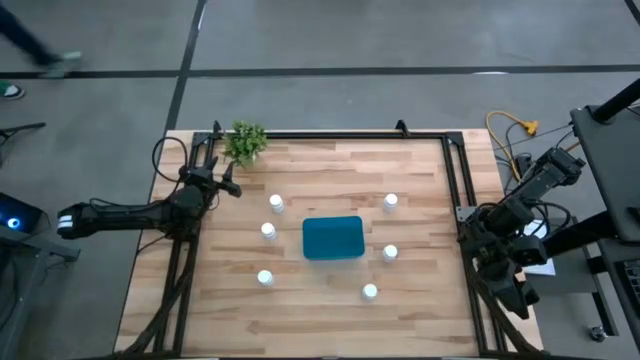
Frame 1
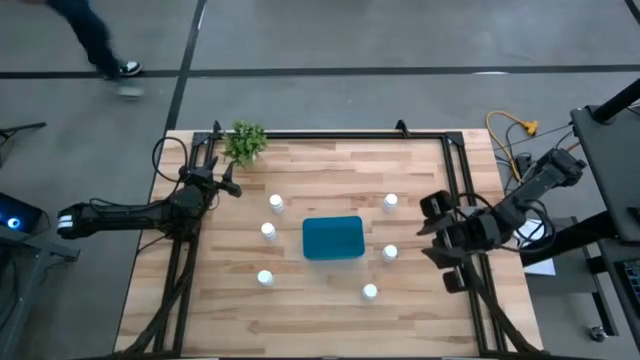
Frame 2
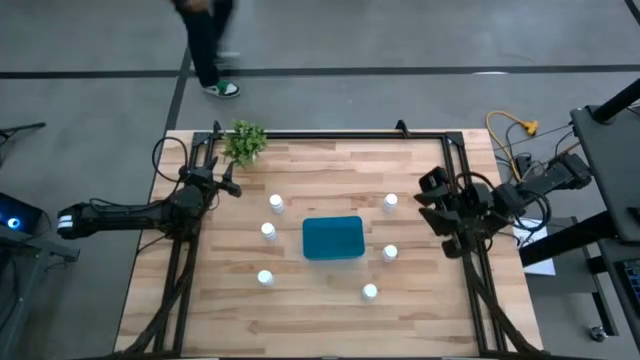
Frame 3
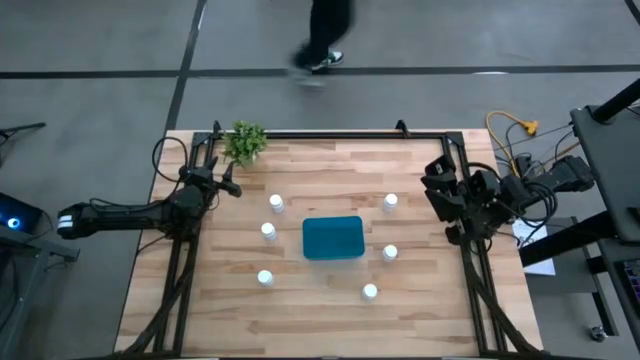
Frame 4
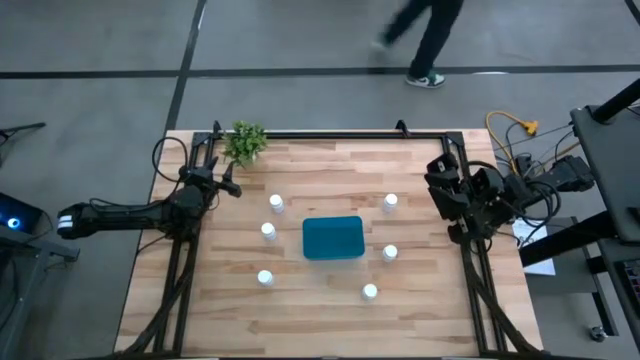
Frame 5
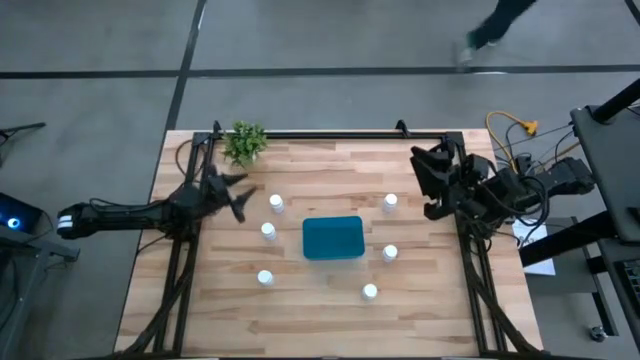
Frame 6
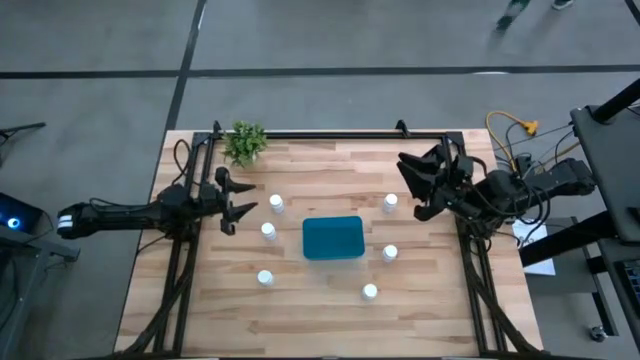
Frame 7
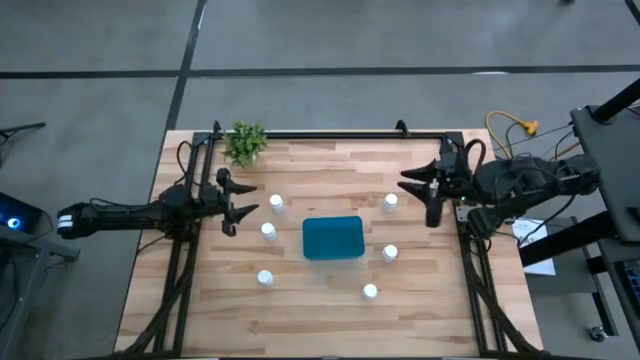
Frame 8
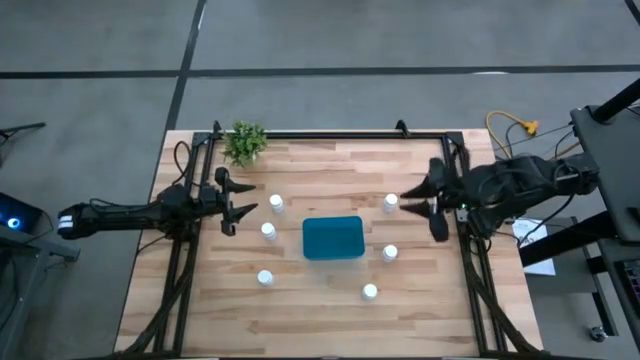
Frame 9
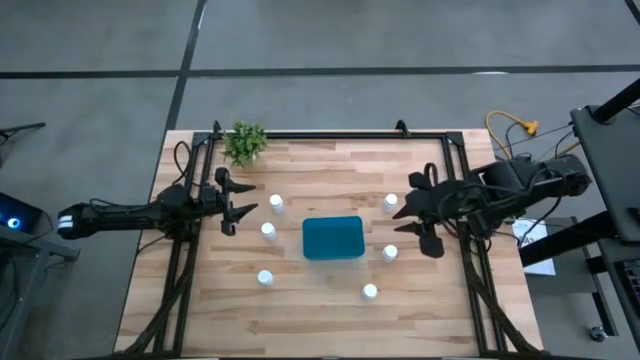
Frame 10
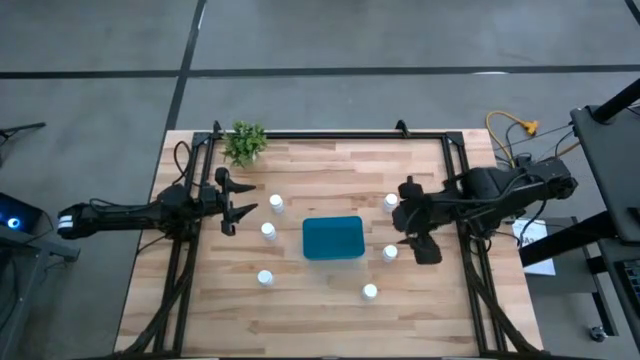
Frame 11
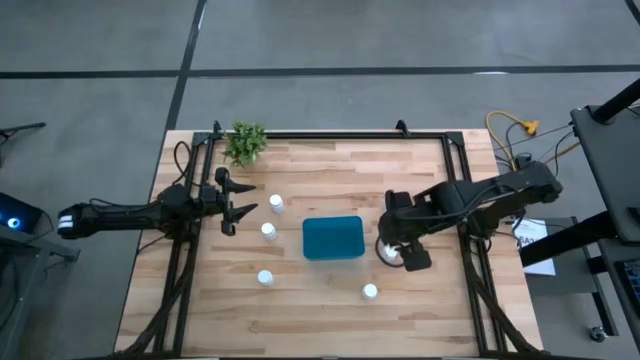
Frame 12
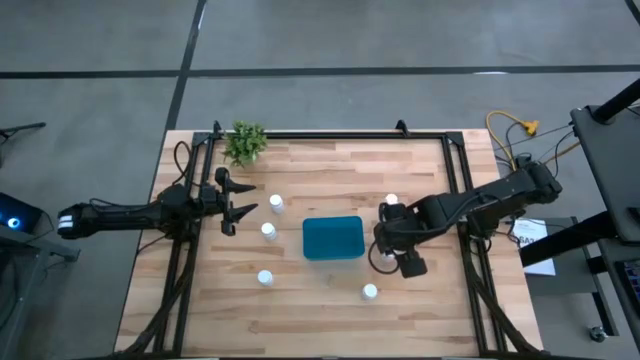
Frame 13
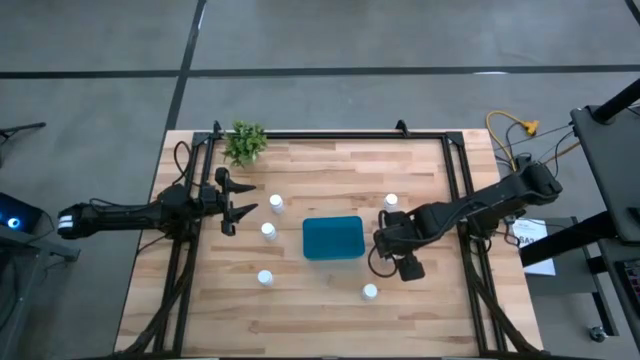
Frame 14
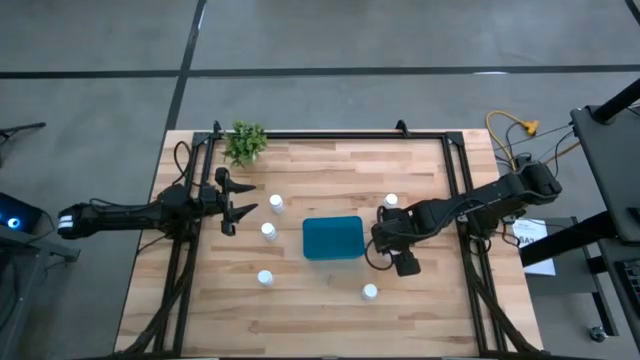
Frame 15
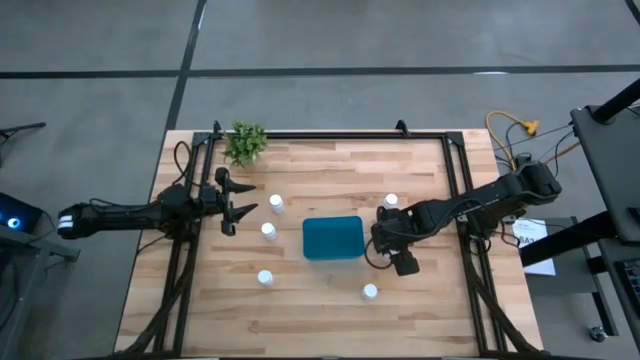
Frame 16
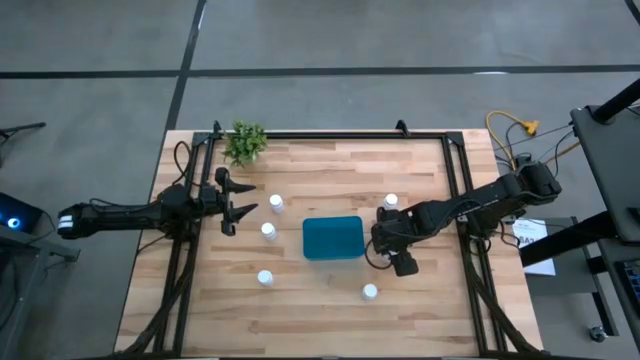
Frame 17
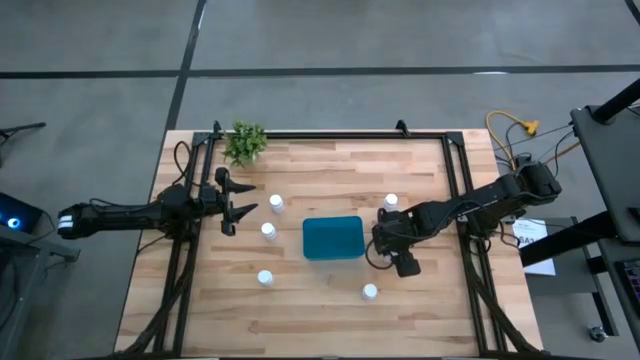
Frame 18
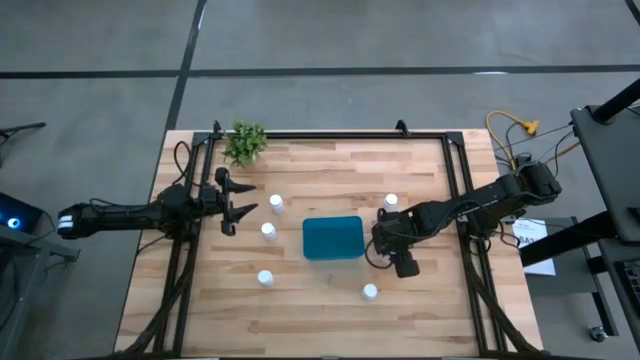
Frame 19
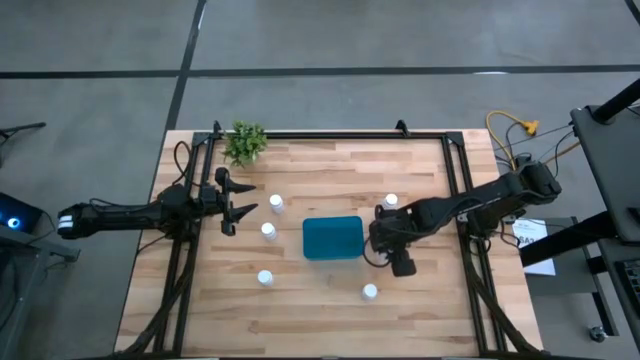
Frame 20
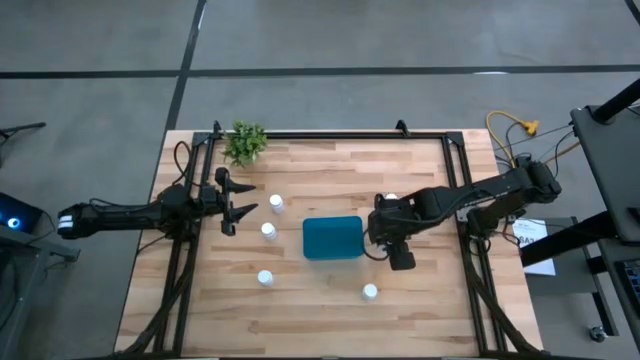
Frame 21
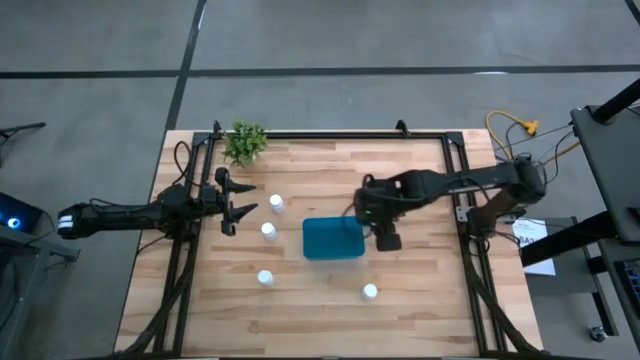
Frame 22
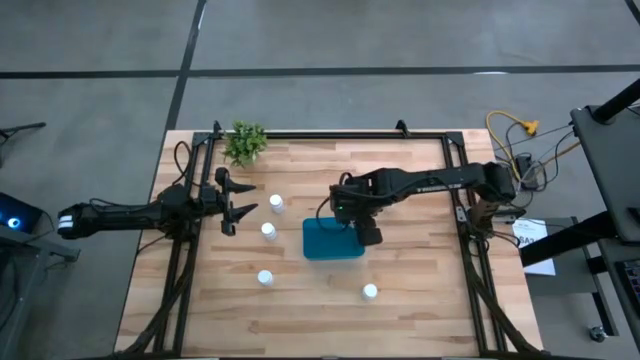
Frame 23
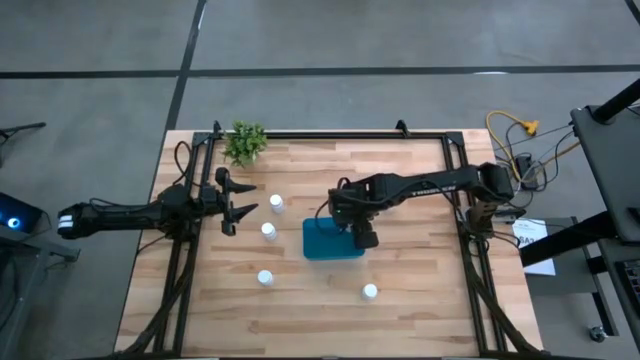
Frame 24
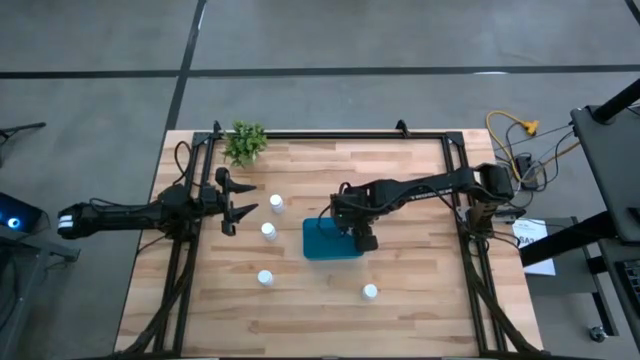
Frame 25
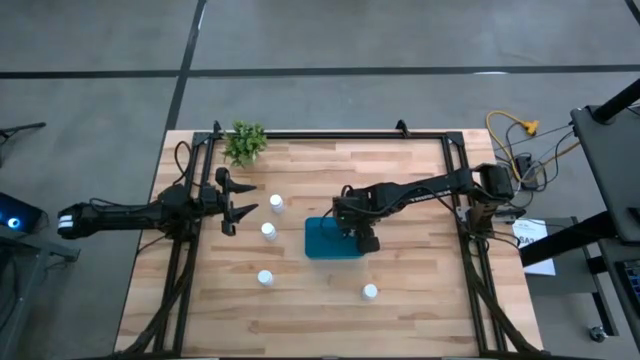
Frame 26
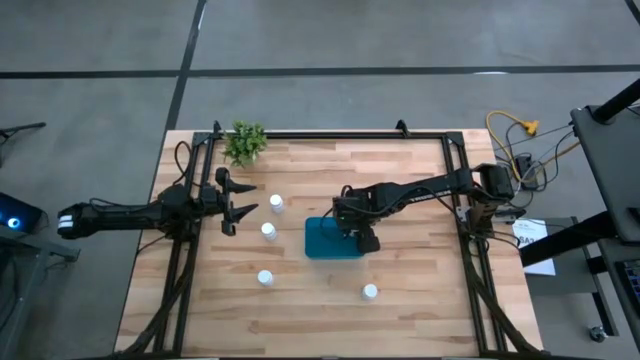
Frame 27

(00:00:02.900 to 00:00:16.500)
Task: Pick and place pill bottles into a basket
Put the white pill bottle into the blue bin

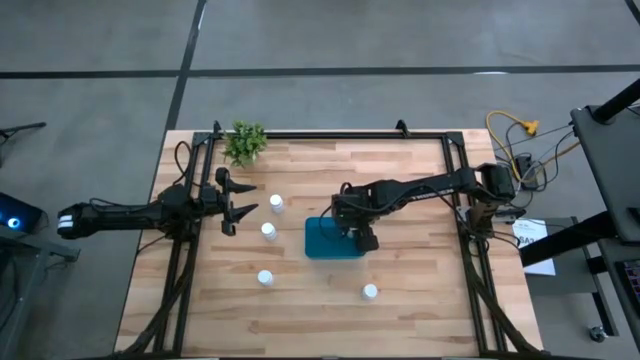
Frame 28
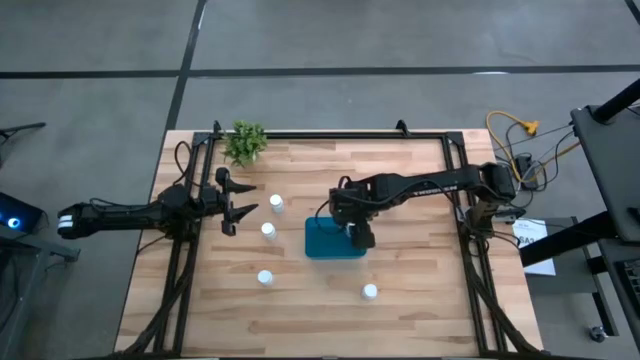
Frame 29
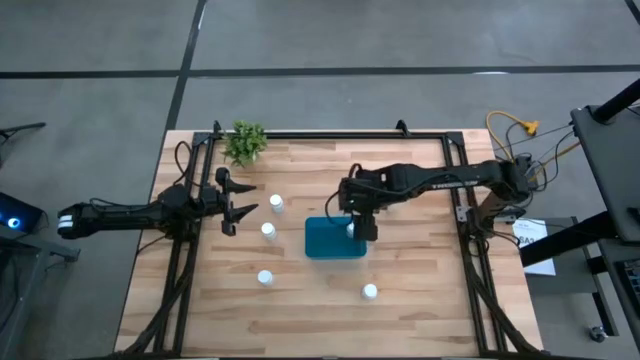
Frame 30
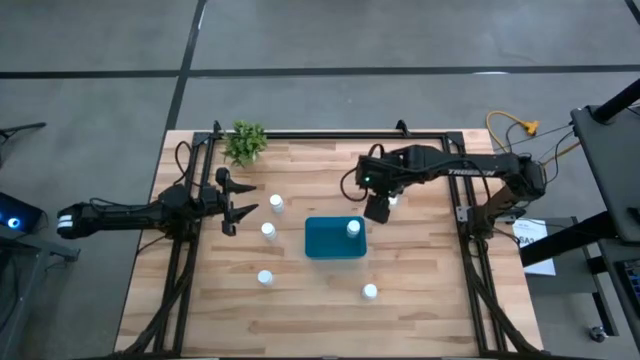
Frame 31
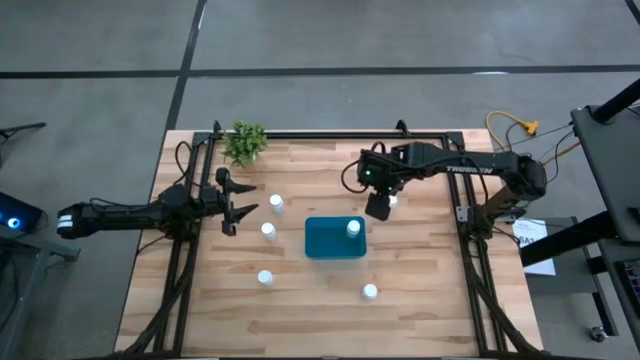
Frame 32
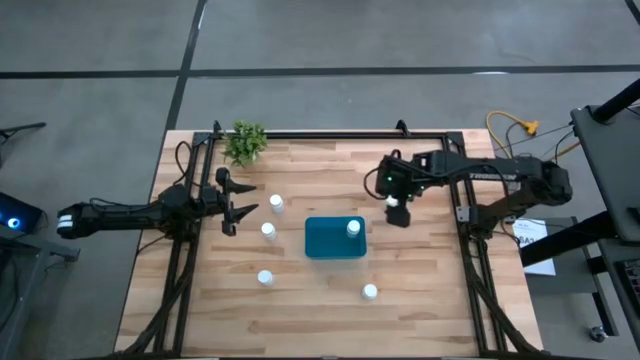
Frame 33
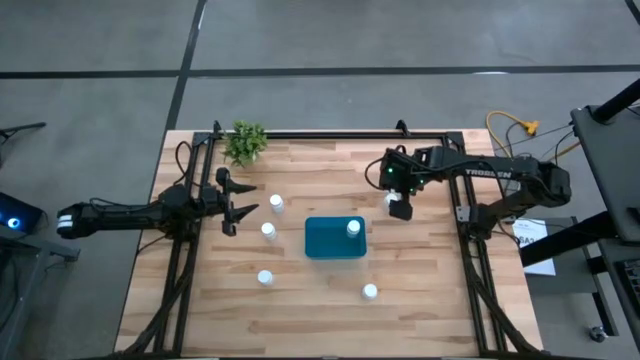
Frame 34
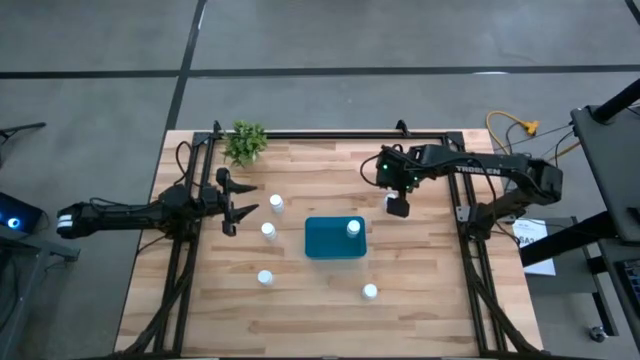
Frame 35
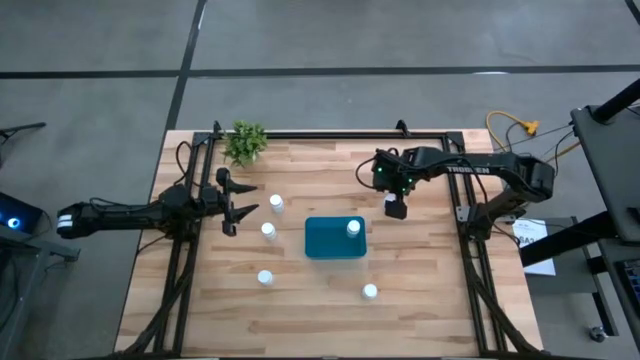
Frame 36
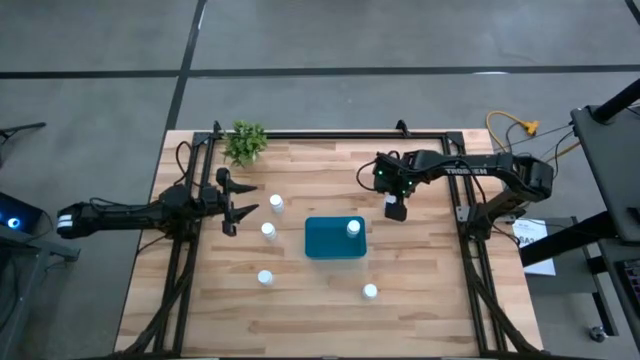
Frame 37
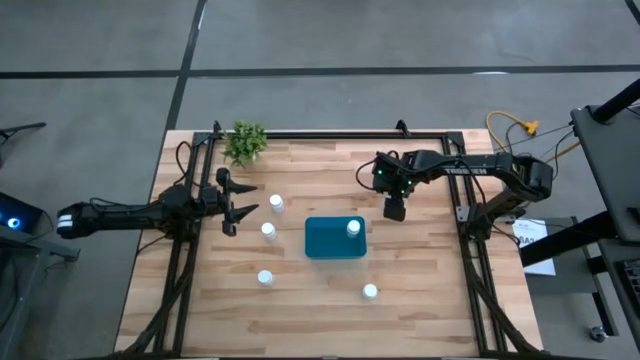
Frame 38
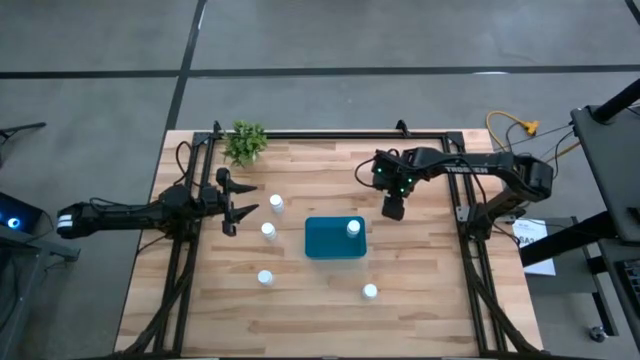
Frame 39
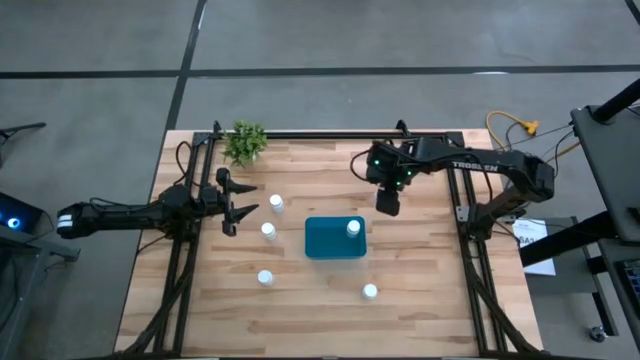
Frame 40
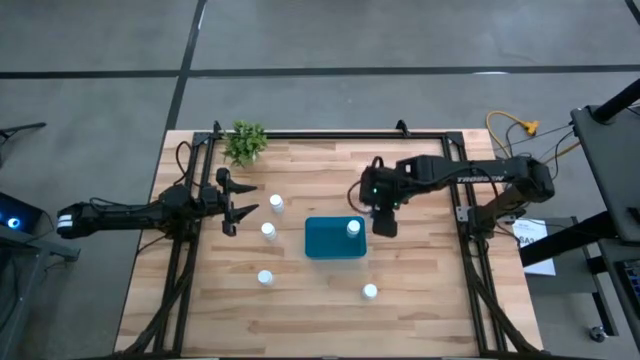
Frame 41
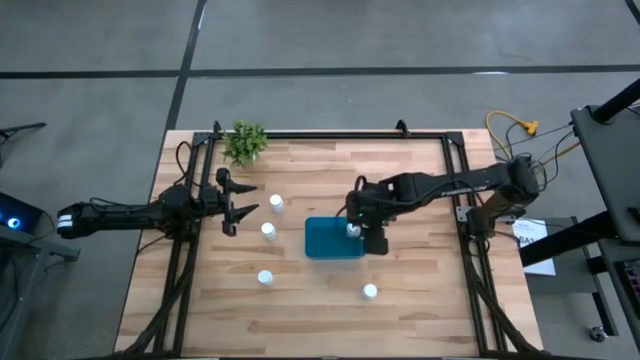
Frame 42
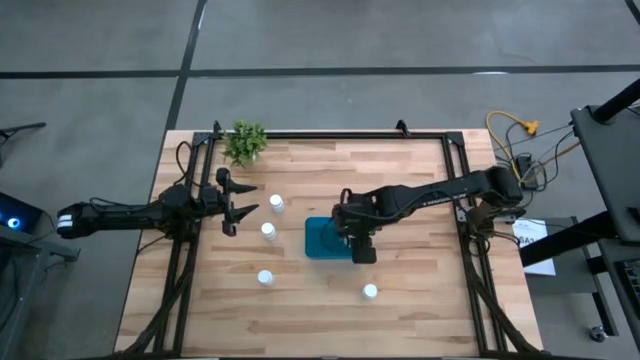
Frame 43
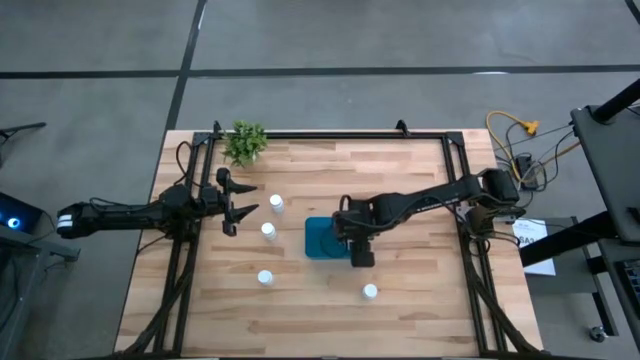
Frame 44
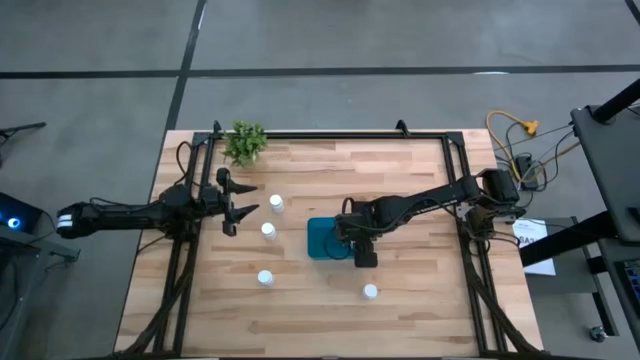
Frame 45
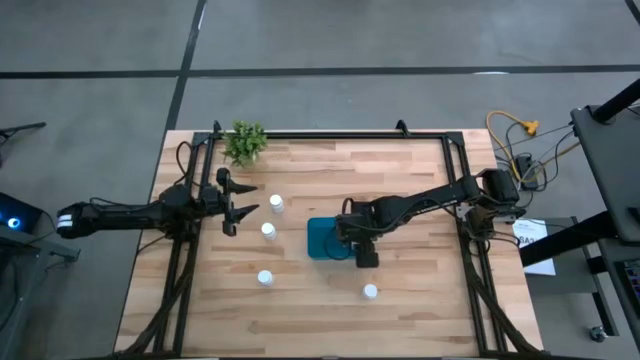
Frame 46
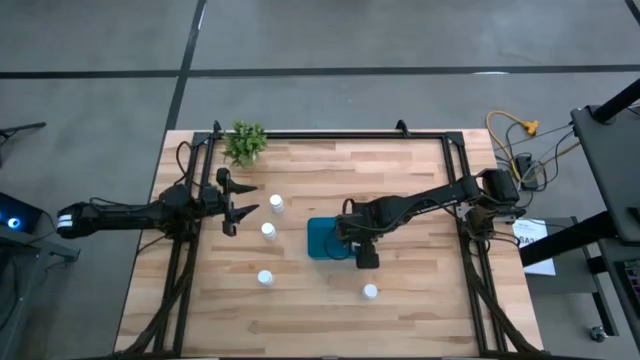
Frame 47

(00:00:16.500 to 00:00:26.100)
Put the white pill bottle into the blue bin
